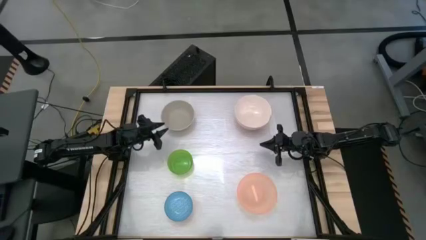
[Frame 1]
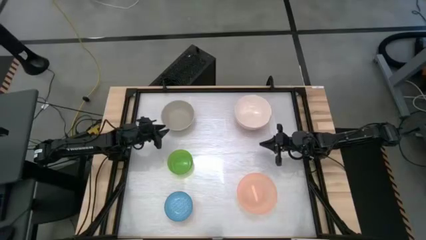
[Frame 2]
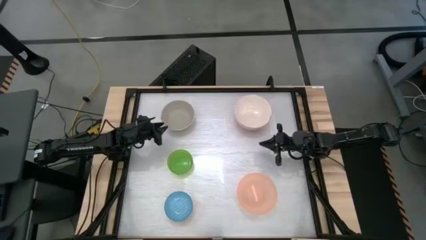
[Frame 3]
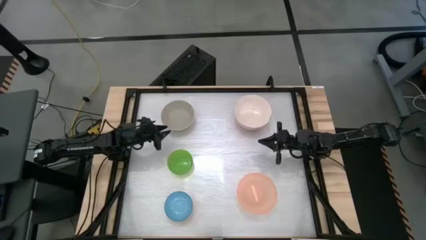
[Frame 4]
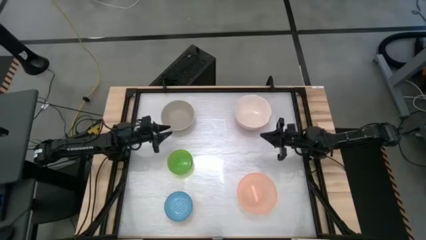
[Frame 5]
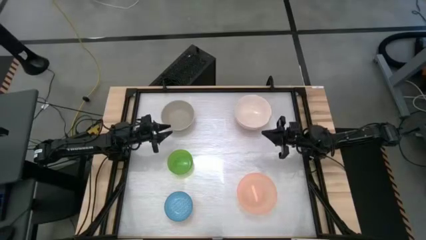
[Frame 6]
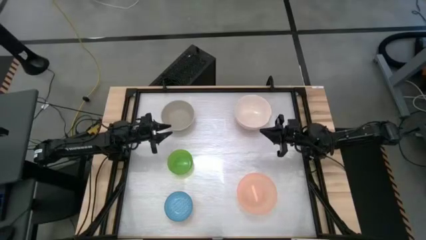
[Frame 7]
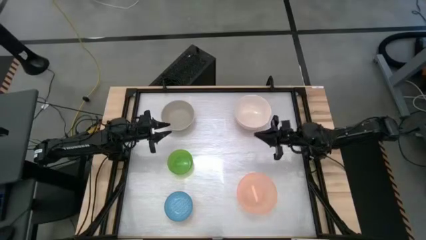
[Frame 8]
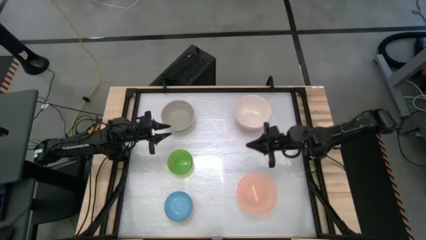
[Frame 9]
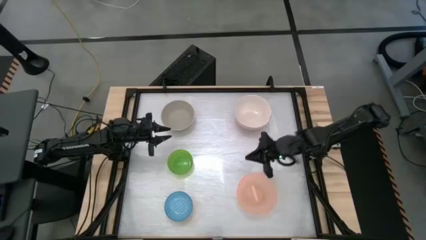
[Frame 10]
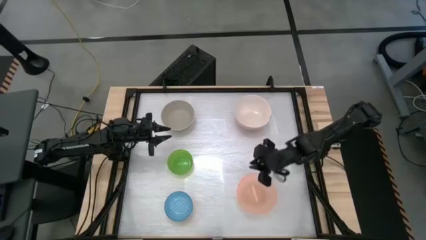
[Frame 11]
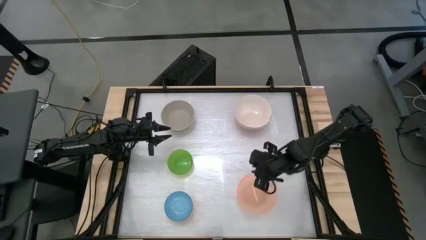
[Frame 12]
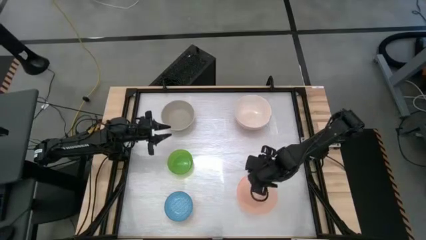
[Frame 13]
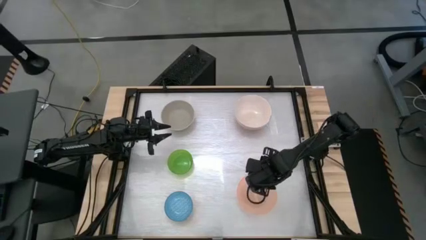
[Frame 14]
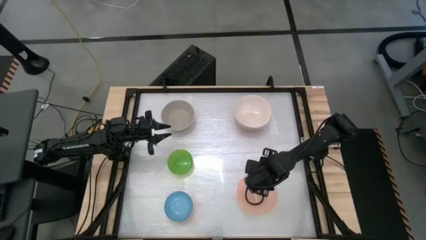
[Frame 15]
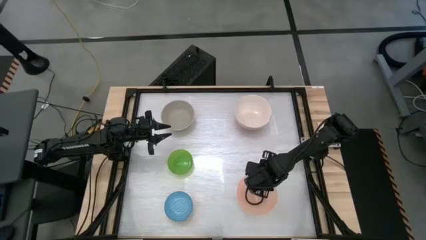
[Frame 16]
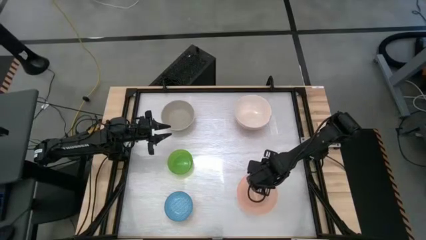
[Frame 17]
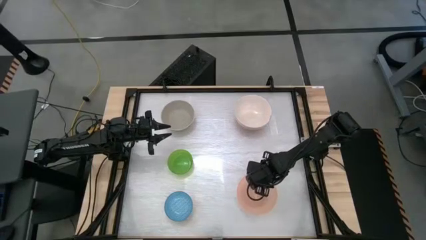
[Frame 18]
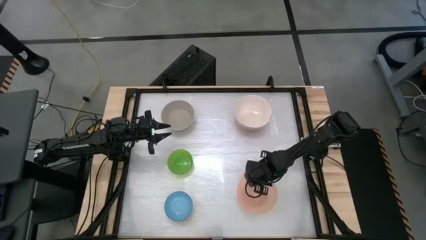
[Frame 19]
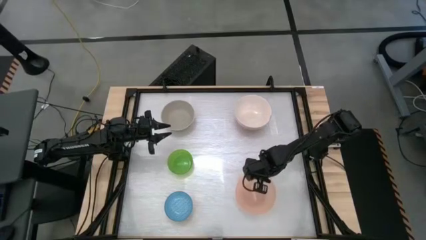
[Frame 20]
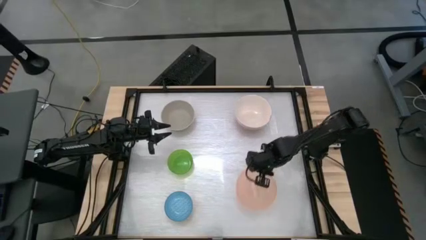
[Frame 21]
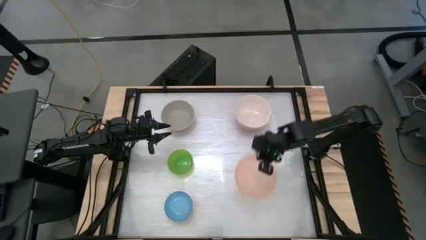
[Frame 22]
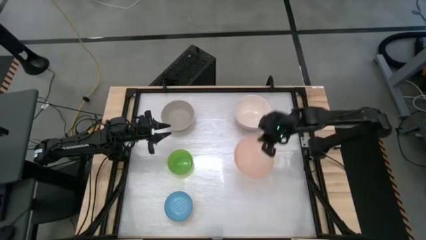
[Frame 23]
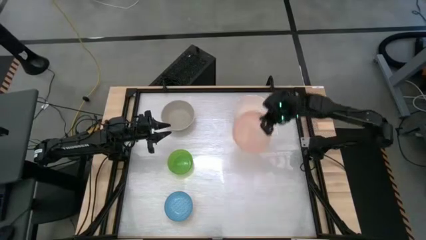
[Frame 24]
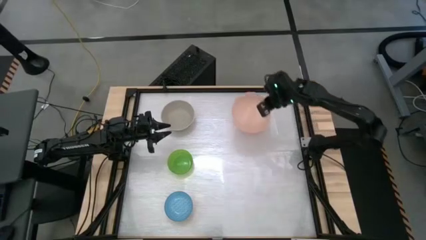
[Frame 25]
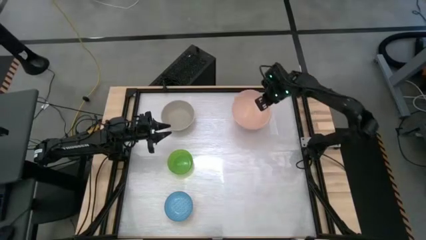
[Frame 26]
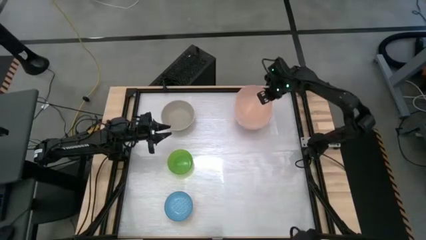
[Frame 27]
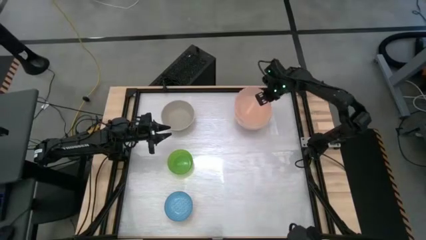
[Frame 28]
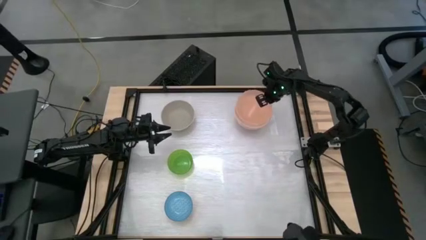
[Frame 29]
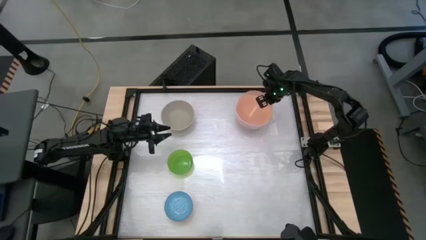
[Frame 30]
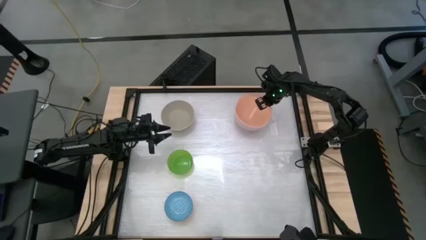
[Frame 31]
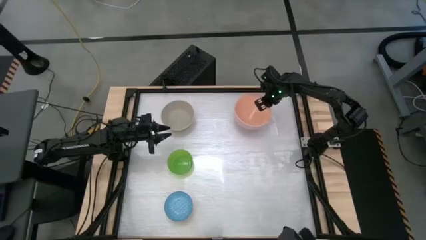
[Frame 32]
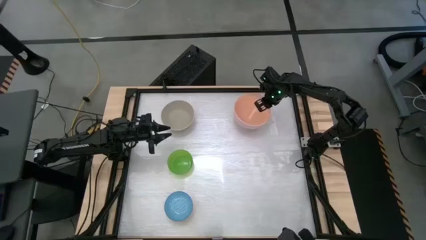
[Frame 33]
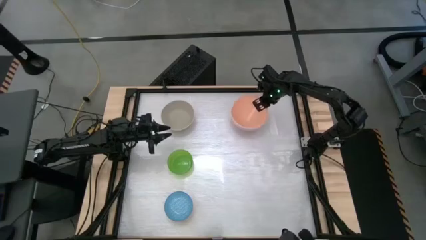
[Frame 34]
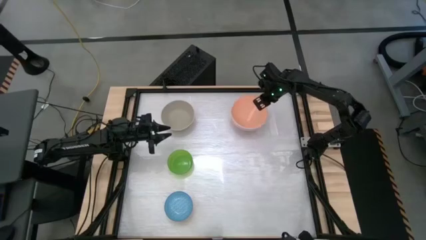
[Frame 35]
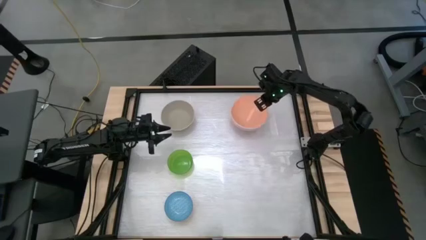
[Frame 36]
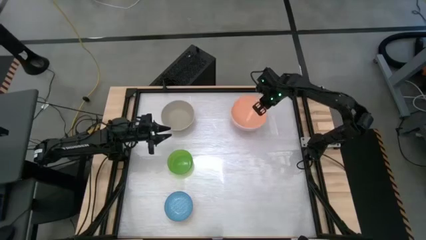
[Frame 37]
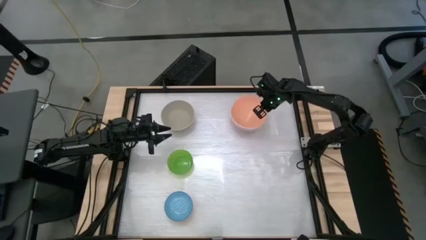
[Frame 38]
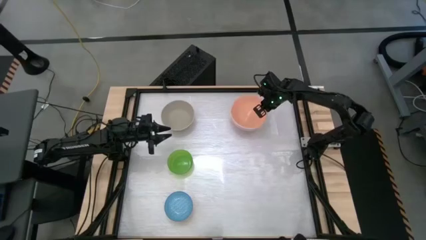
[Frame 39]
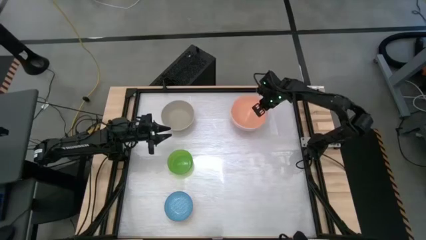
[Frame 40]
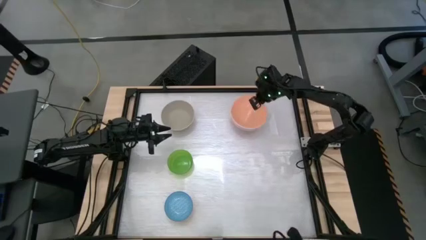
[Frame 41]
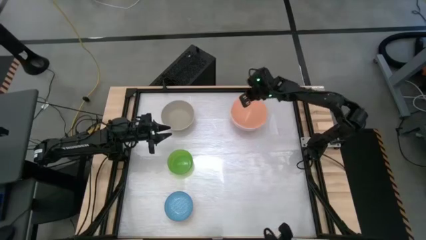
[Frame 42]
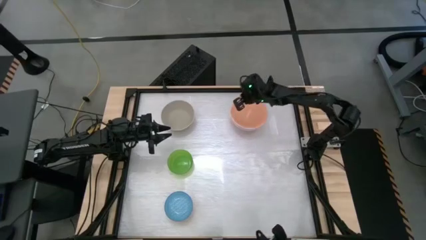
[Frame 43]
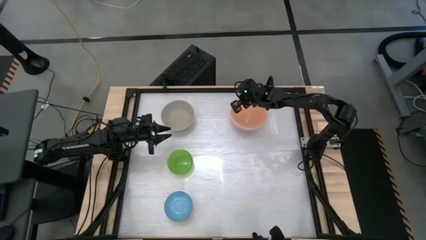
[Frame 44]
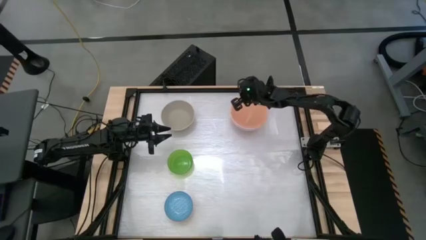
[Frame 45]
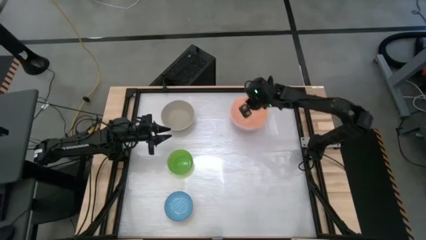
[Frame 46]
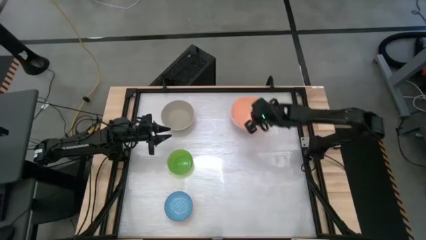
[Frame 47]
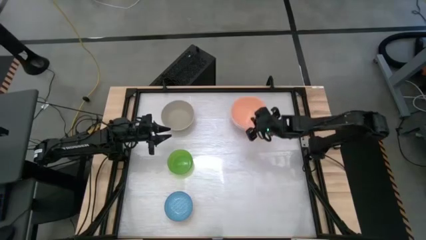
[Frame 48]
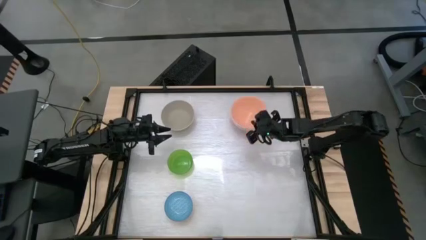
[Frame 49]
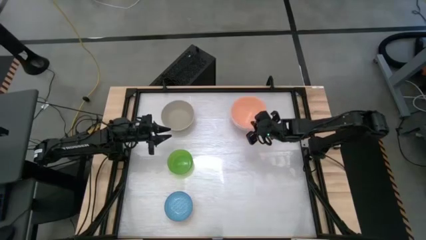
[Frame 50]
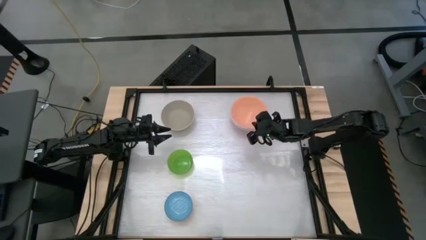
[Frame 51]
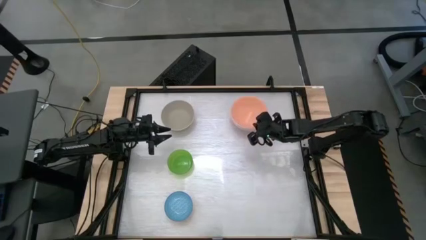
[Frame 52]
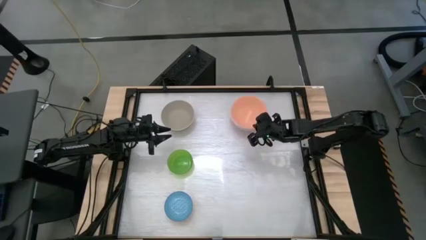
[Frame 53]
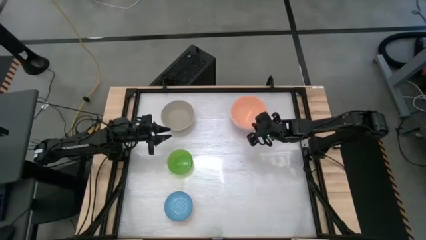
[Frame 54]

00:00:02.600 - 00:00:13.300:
Stack the pink bowl on the white bowl

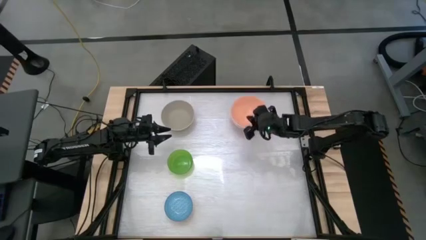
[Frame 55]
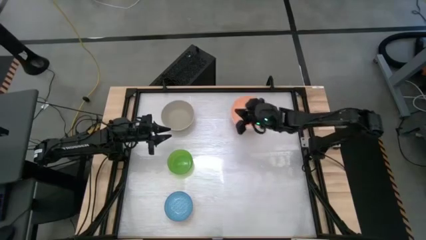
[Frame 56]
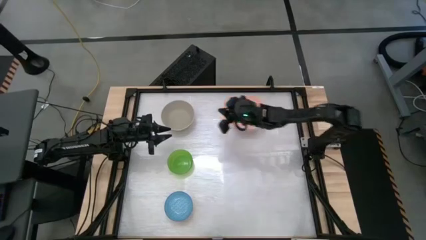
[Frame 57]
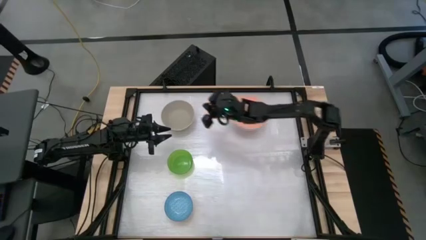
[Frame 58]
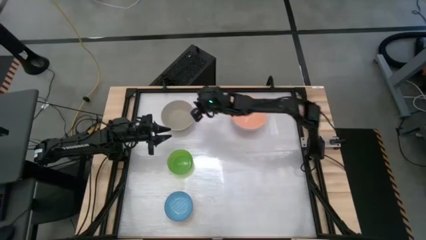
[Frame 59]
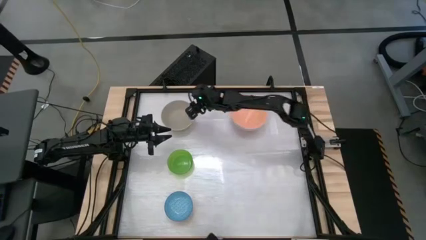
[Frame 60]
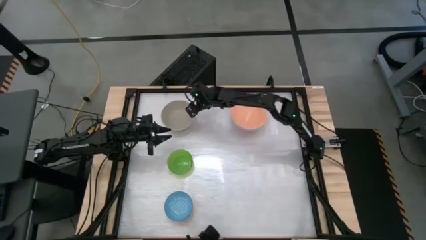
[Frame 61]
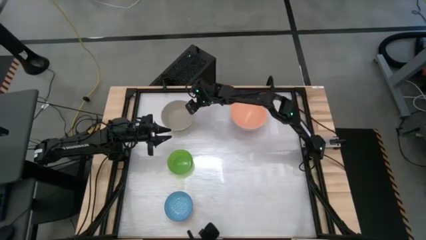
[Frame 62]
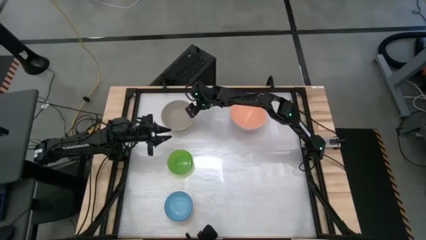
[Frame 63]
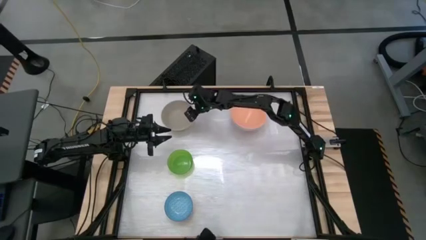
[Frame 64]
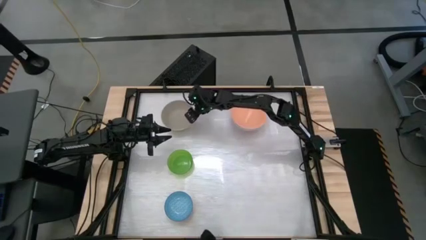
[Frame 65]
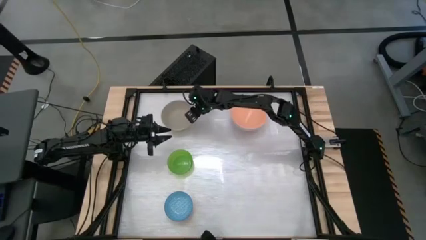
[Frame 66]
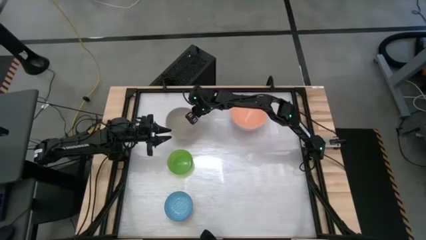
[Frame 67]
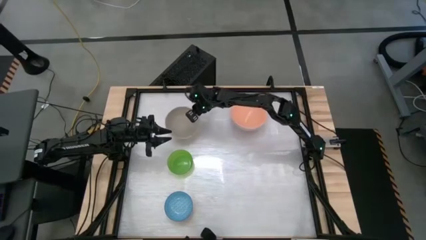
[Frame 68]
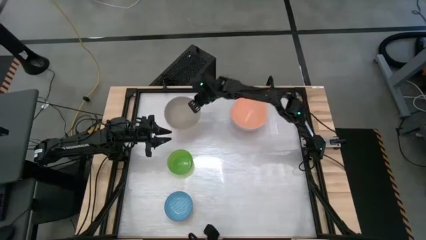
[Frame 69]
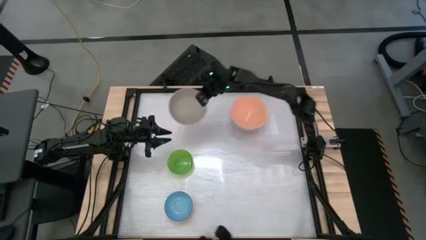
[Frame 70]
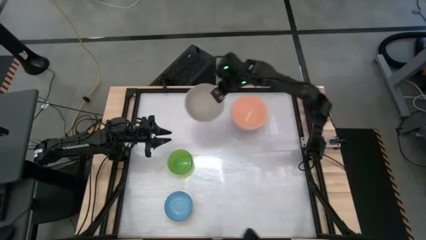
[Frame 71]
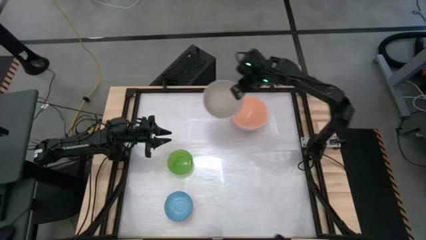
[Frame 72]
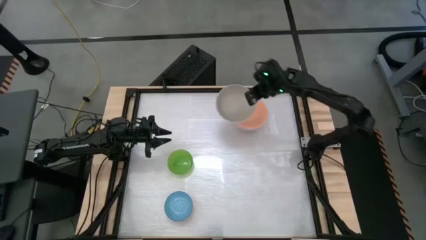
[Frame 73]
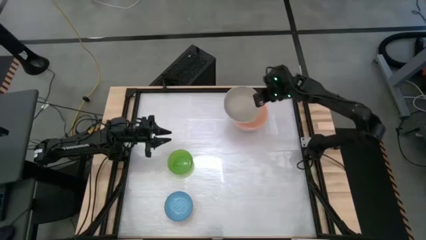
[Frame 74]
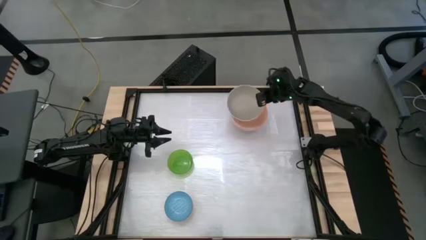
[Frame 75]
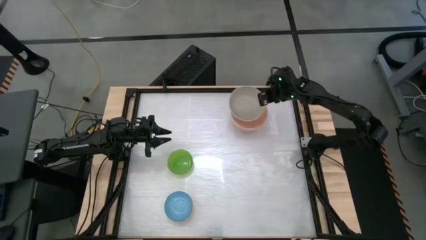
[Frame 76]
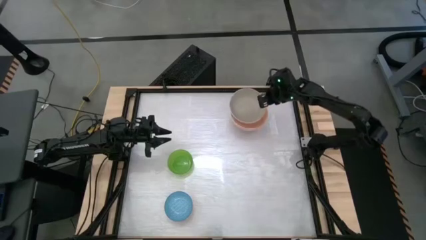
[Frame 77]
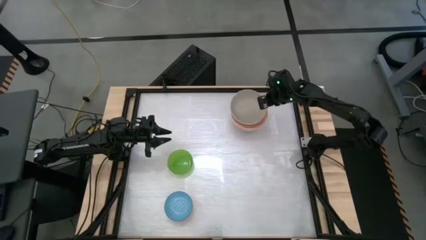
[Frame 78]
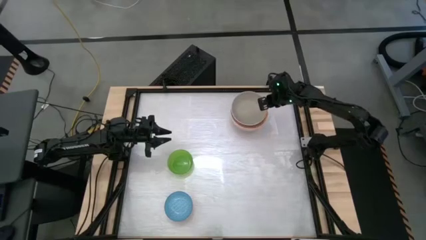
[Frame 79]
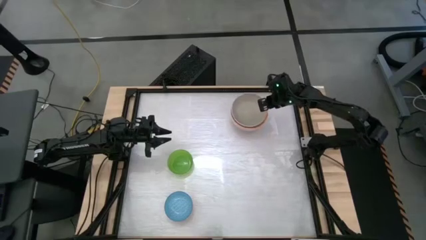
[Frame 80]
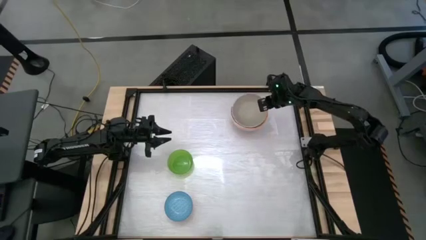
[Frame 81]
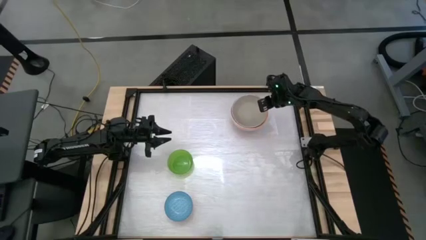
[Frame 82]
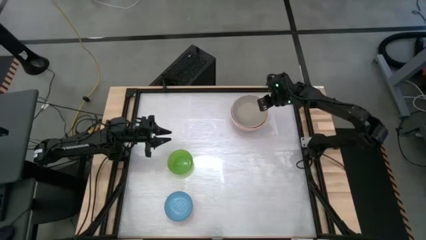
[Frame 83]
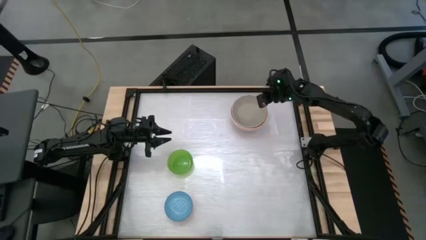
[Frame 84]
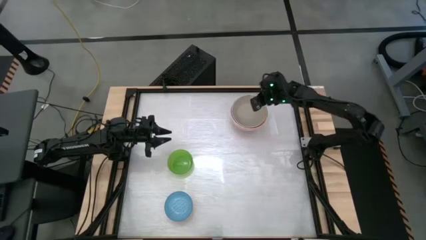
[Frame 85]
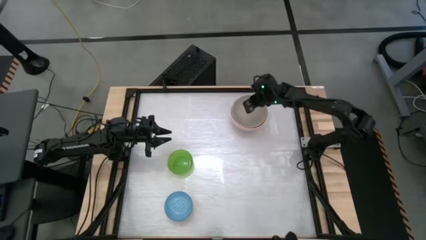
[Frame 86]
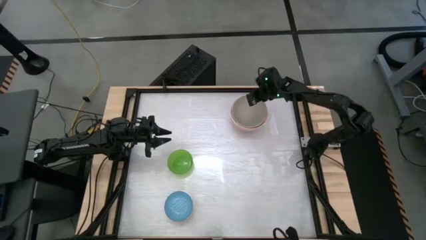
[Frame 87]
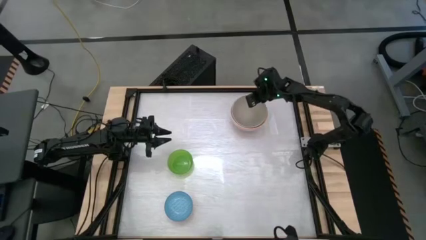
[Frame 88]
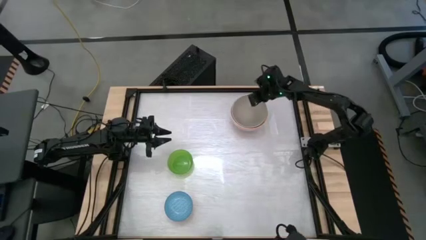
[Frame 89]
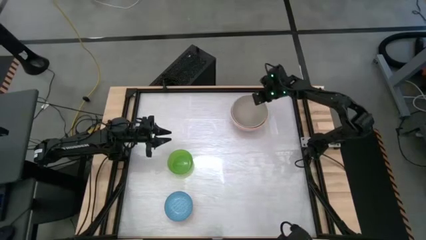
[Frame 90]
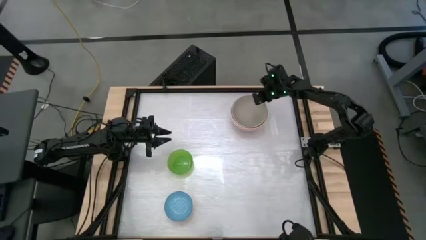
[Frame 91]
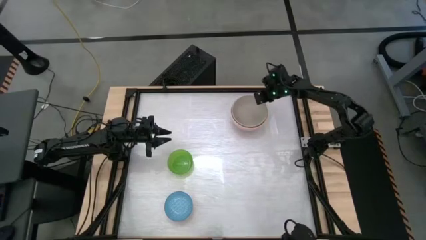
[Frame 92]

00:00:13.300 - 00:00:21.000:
Stack the gray bowl on the pink bowl
